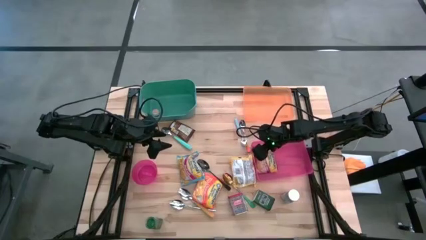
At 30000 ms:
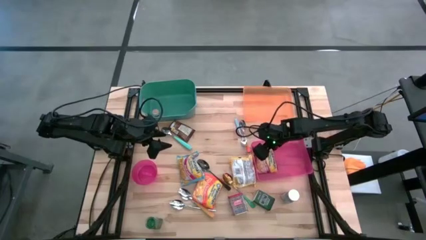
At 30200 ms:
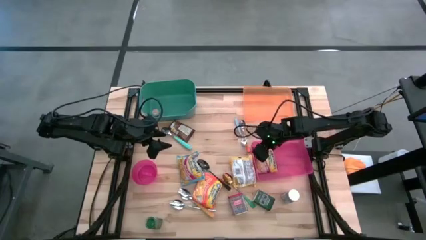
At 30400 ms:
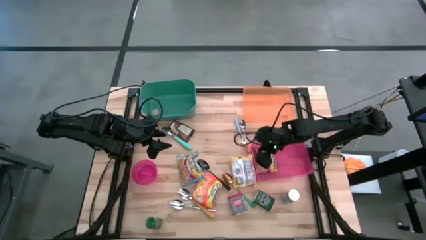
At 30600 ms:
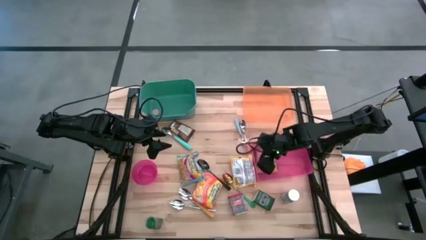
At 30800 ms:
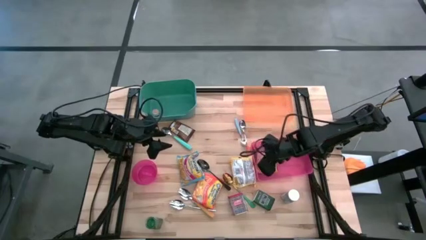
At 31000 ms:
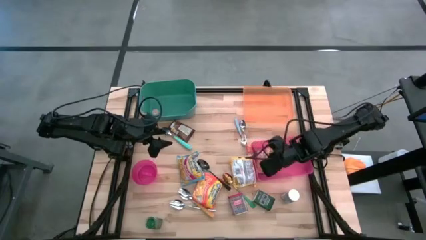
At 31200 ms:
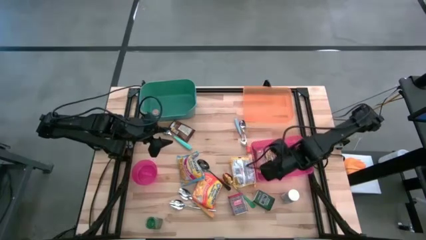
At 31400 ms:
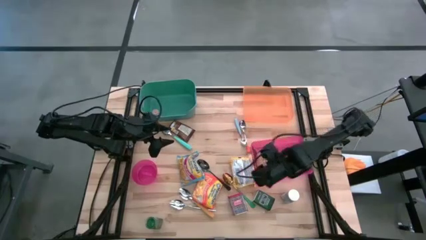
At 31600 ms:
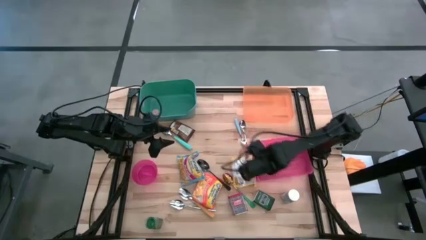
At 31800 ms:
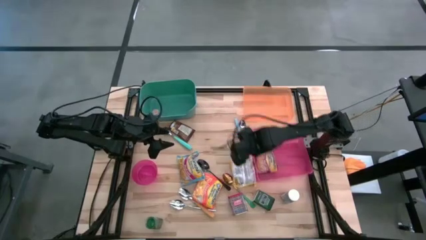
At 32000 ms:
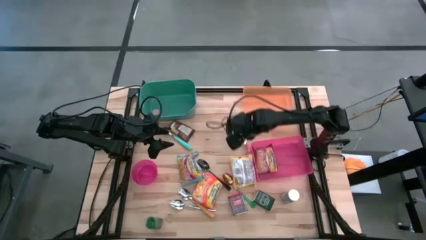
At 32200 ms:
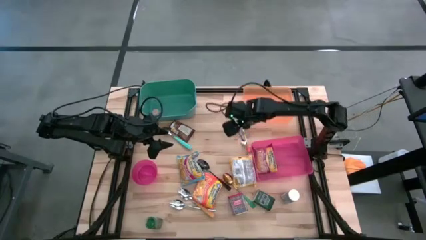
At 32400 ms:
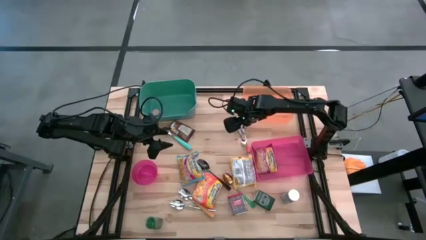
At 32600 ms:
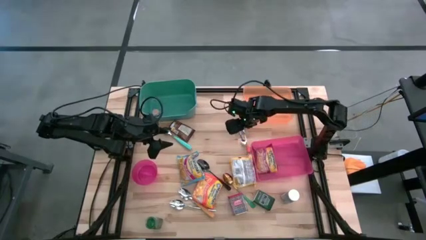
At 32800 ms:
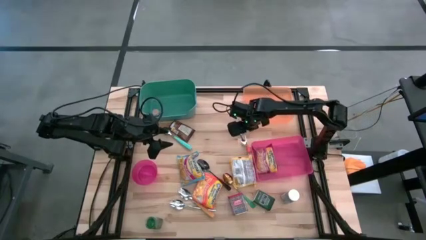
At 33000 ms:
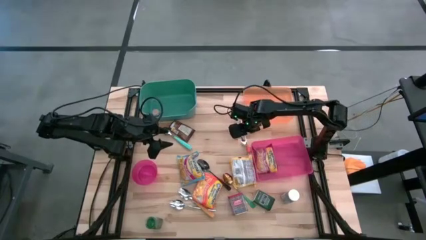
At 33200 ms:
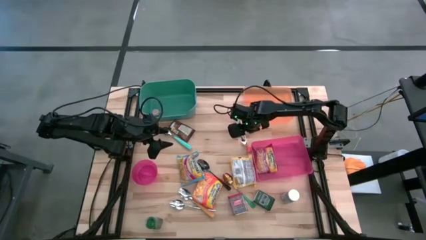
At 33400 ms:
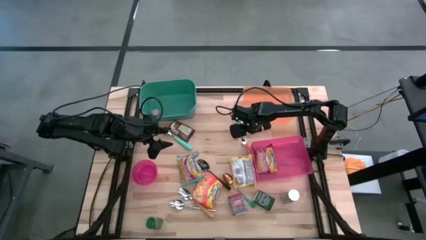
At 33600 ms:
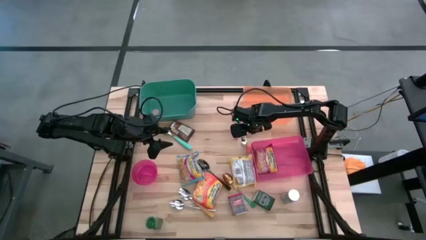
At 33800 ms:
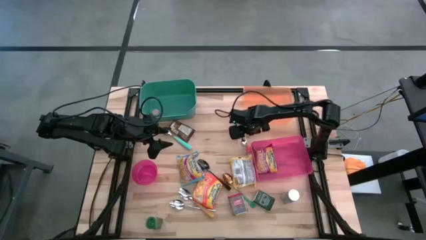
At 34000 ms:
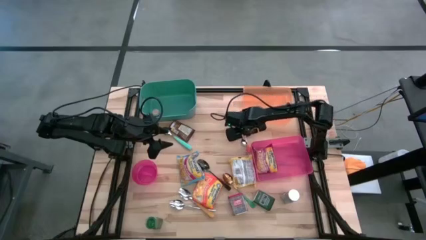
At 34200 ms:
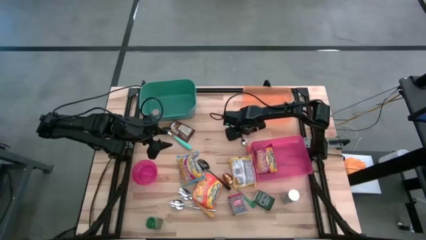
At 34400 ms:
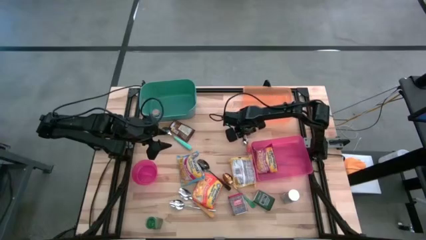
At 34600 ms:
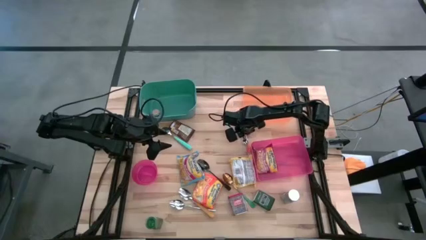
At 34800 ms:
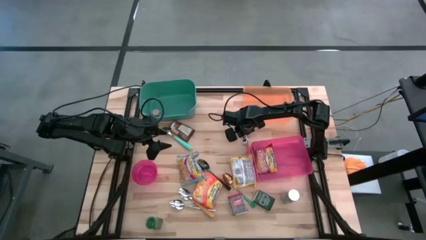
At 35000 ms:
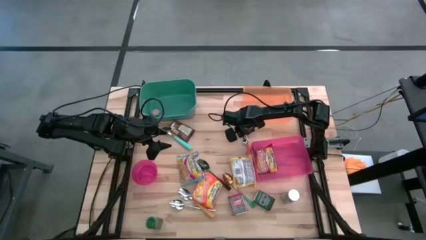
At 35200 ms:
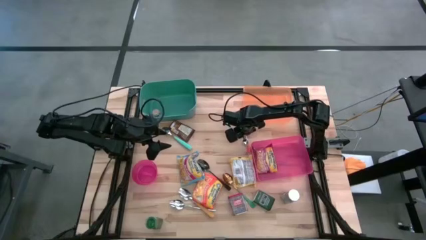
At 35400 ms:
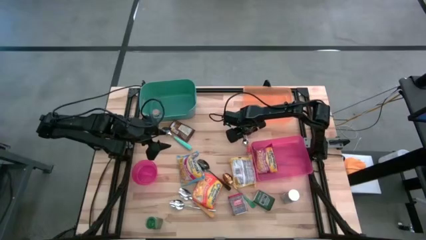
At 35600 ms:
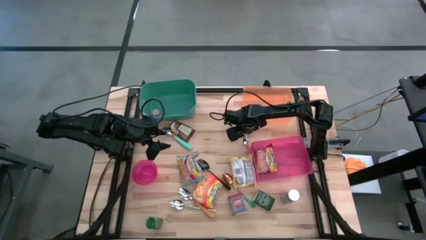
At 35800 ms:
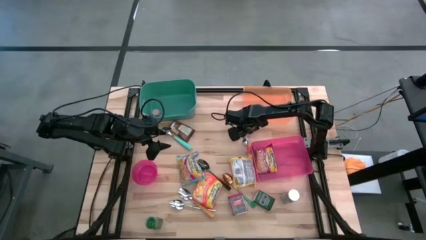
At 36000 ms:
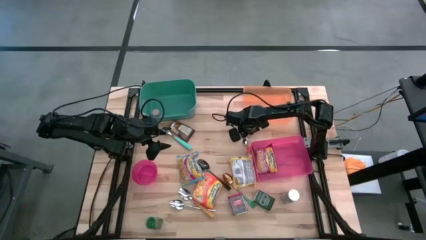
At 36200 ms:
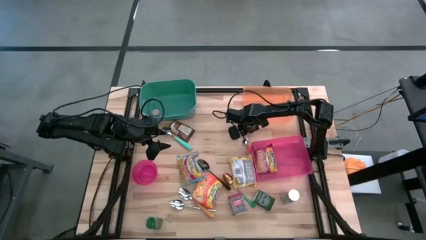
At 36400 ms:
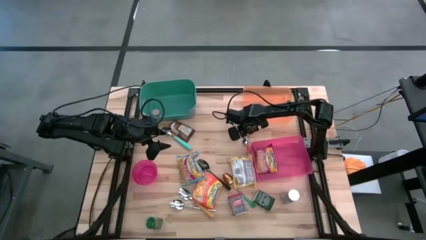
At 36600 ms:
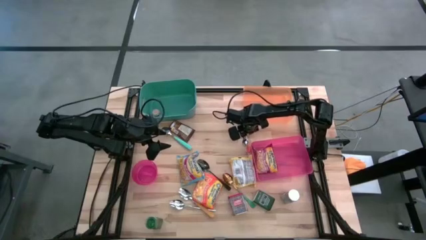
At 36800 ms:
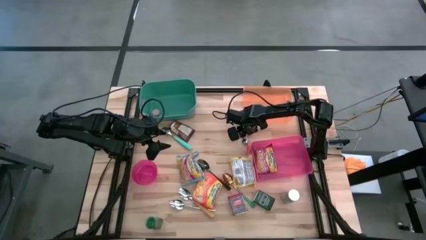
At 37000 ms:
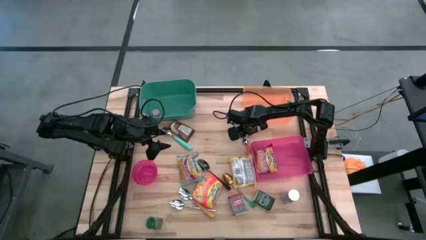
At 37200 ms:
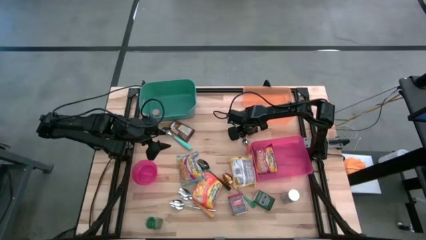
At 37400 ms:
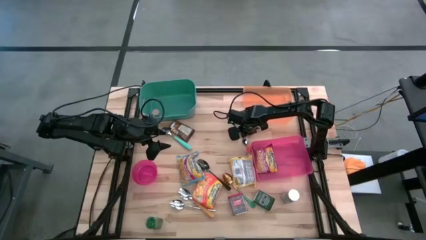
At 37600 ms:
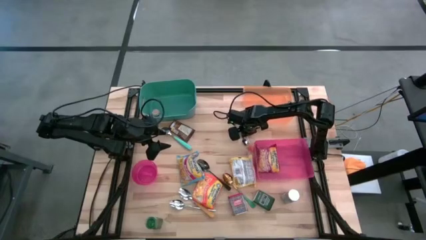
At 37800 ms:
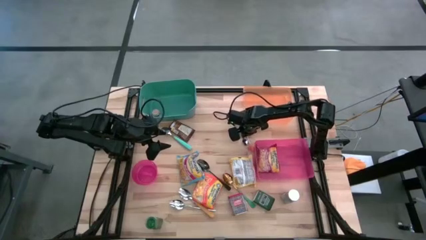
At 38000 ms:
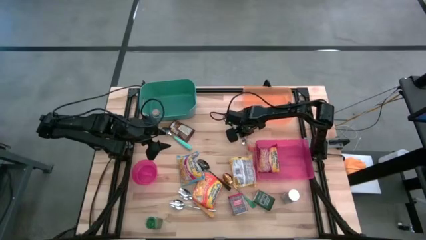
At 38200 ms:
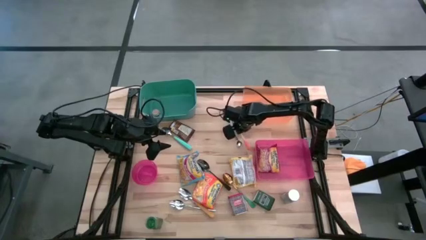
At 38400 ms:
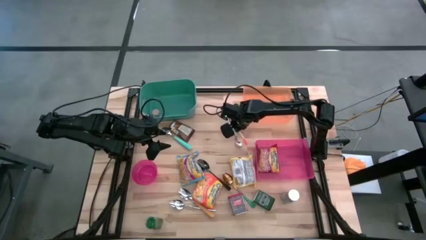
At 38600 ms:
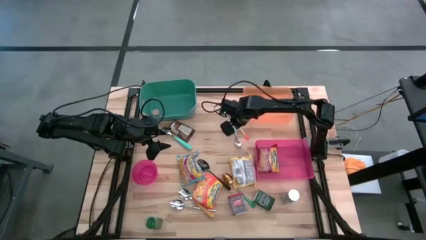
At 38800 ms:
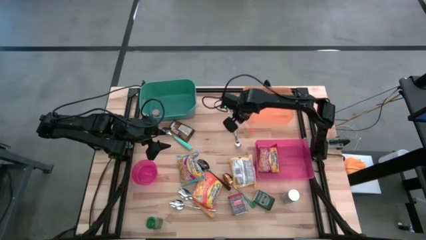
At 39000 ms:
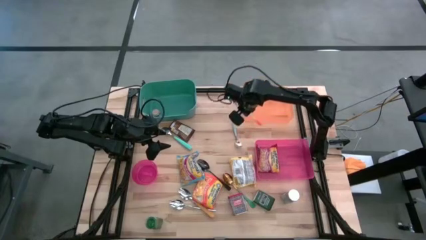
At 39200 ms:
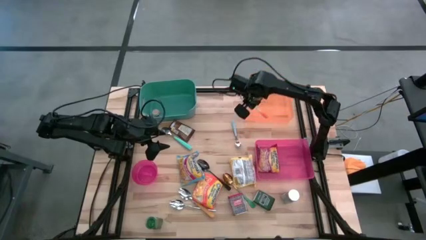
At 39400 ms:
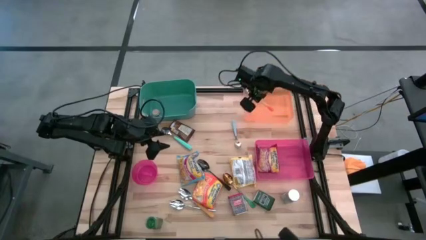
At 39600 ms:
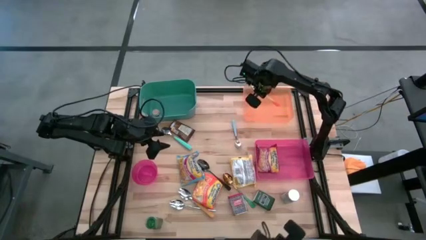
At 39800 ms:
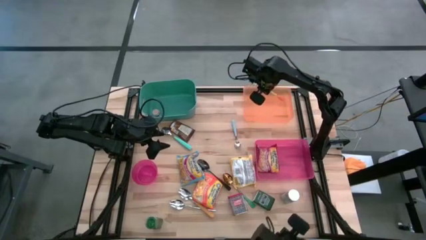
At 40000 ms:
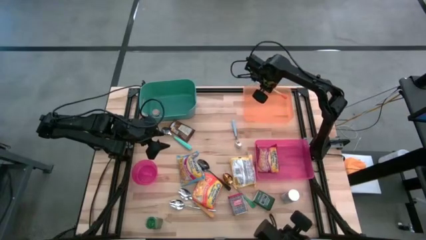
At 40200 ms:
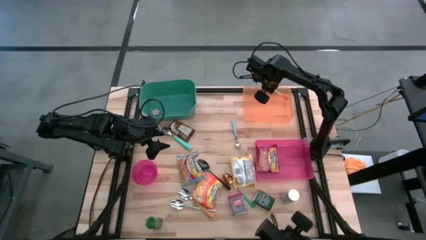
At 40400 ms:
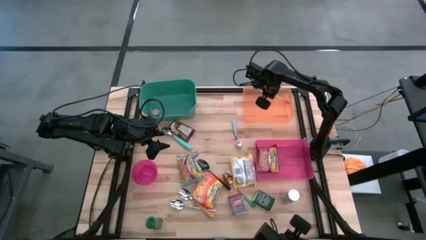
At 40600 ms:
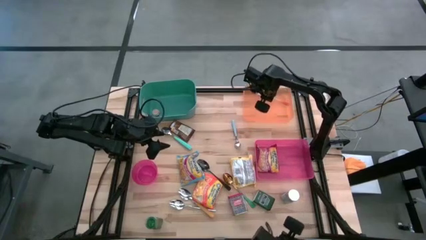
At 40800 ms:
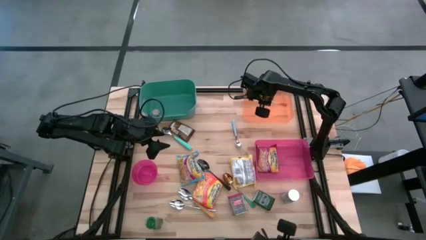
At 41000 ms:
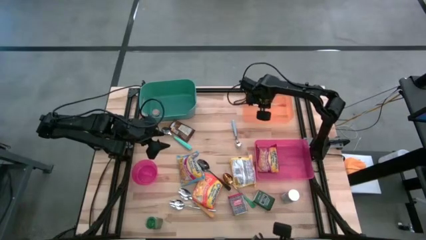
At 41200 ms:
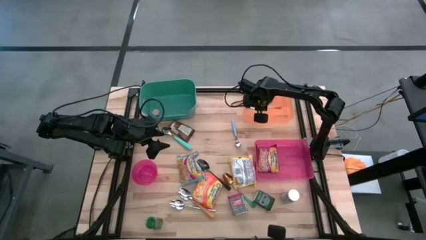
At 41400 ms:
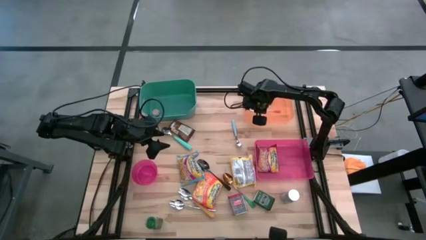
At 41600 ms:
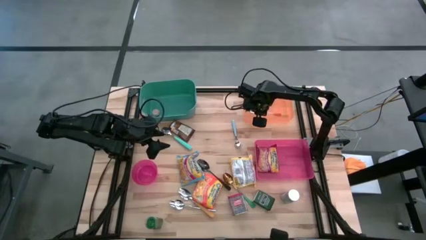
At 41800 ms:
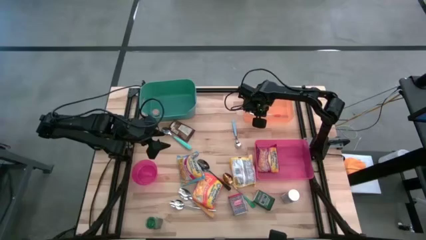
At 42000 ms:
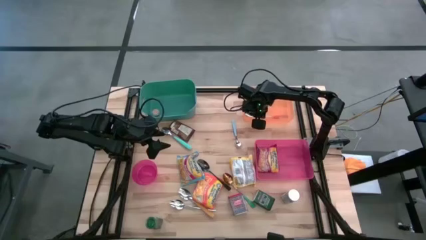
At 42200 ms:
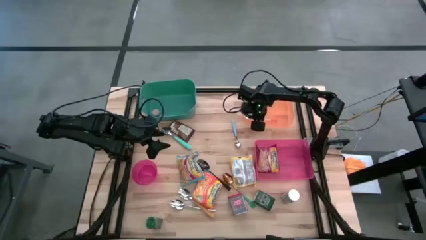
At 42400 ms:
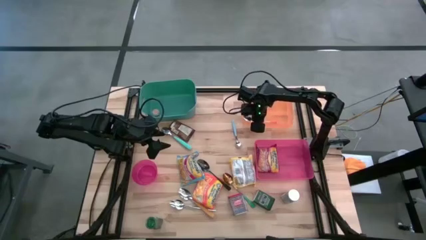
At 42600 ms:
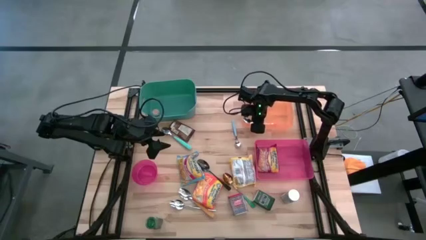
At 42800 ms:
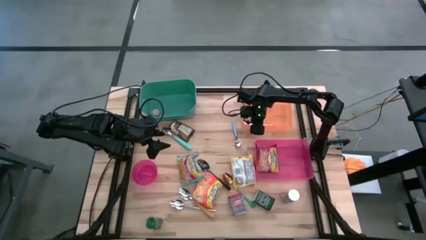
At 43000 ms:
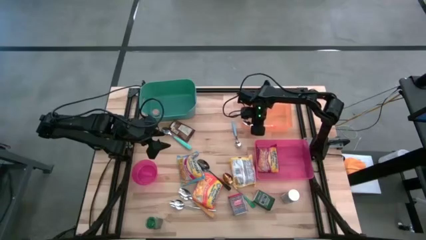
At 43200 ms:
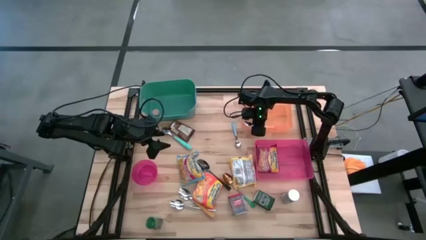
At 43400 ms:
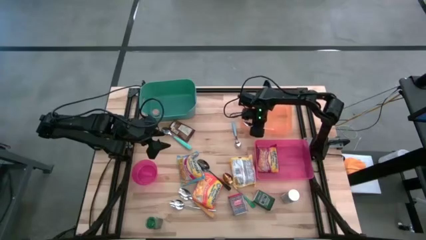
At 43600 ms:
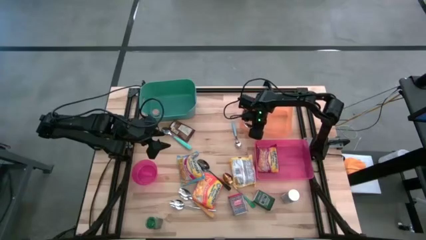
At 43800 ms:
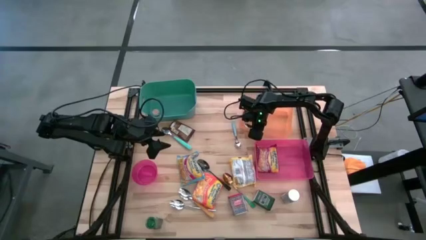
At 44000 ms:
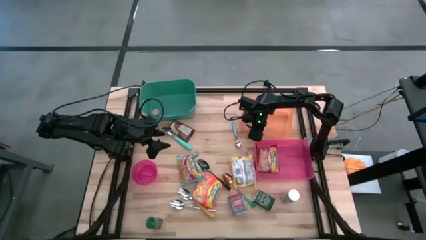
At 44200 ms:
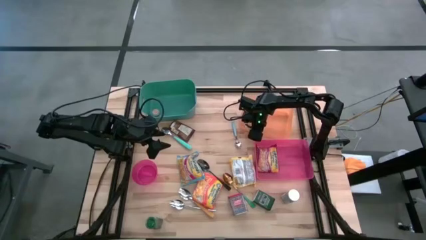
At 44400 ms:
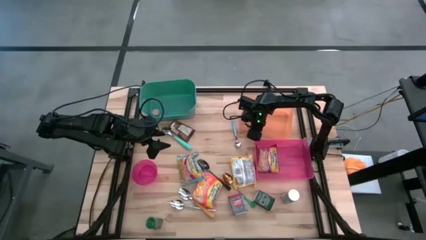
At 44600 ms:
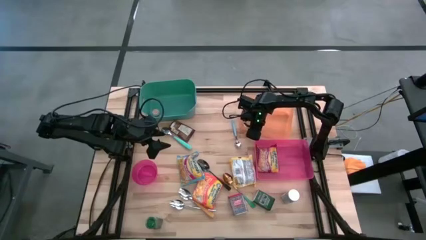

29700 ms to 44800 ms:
Put the orange spoon into the orange bin
